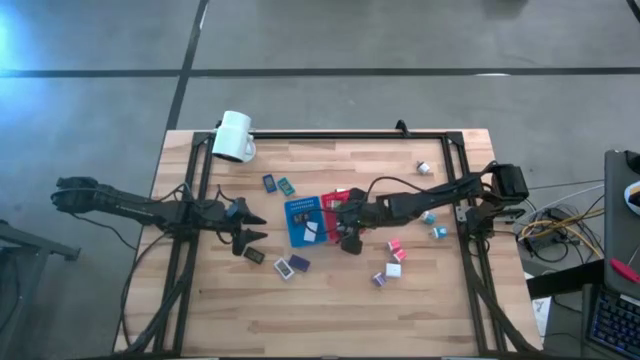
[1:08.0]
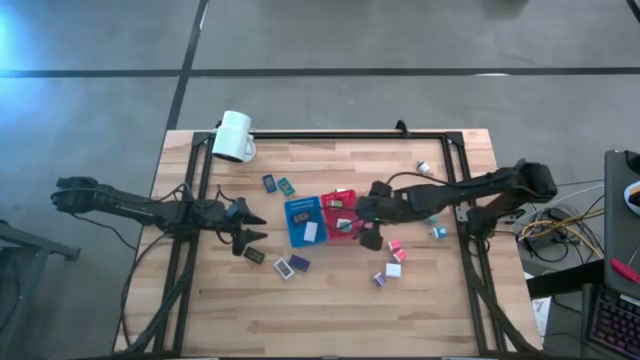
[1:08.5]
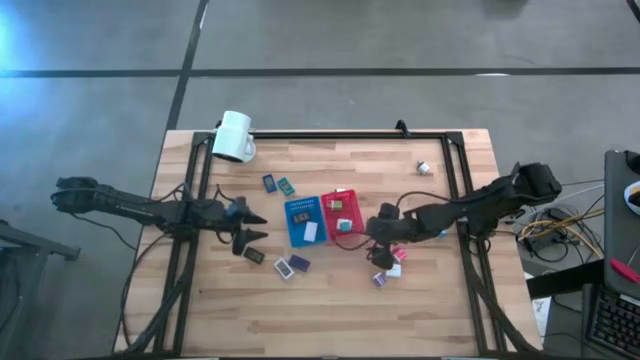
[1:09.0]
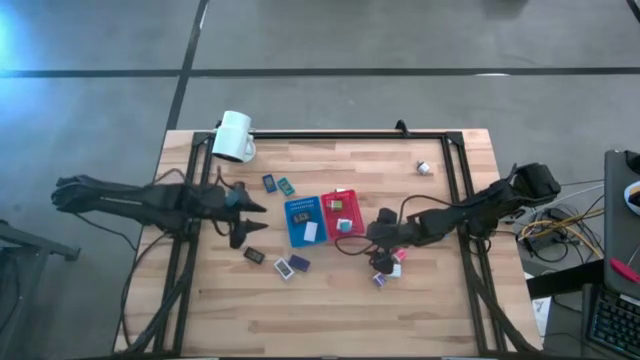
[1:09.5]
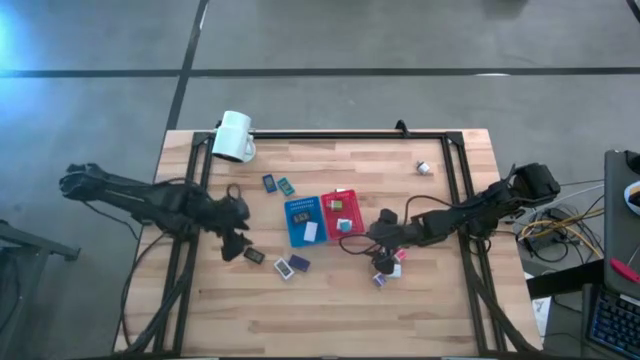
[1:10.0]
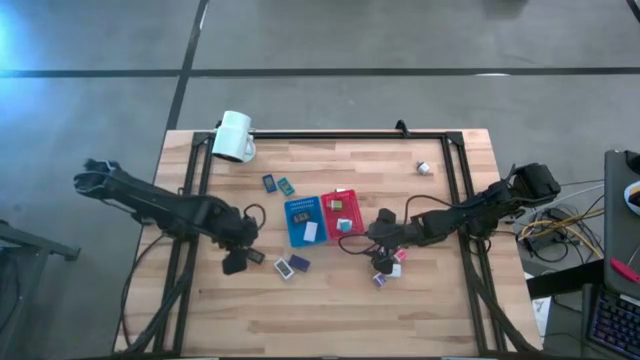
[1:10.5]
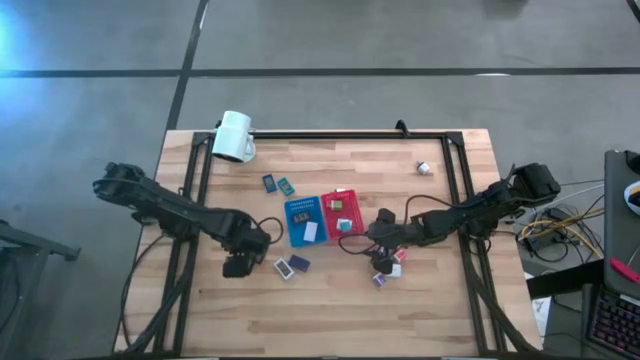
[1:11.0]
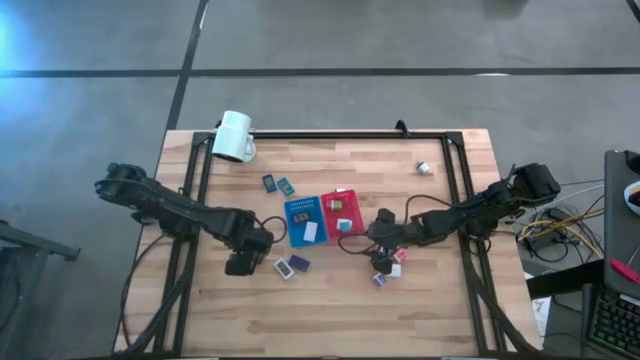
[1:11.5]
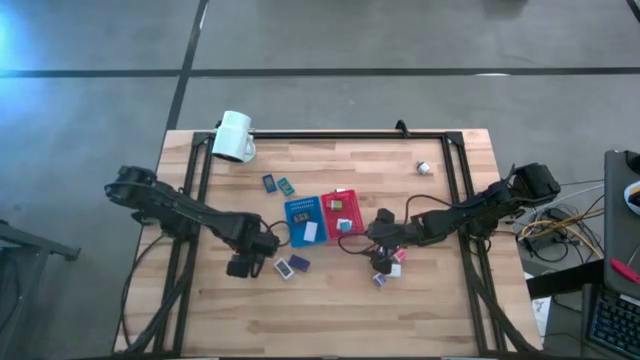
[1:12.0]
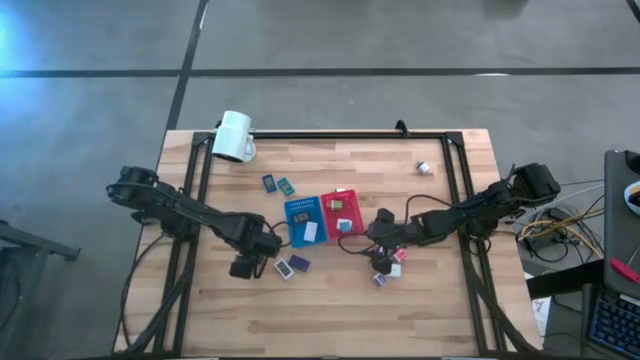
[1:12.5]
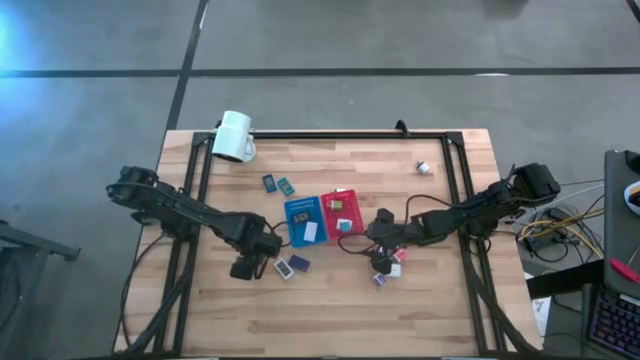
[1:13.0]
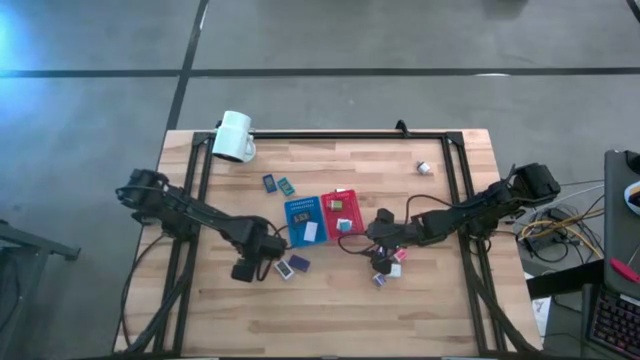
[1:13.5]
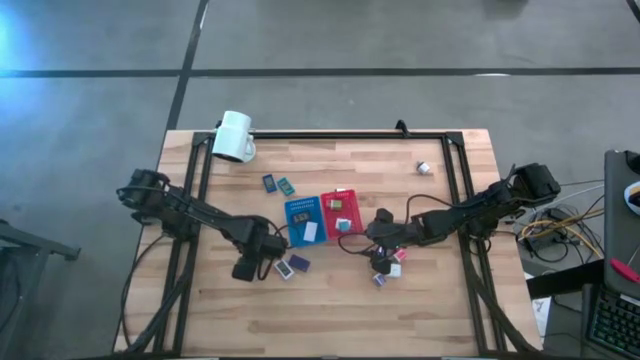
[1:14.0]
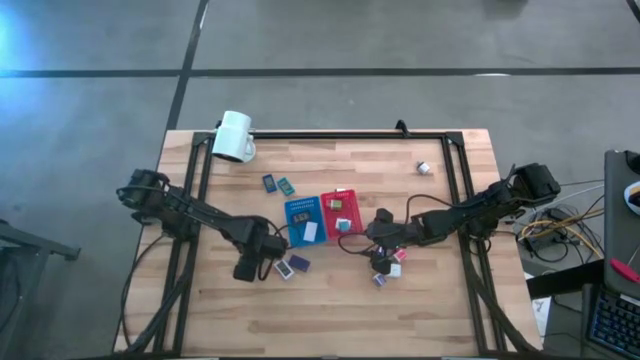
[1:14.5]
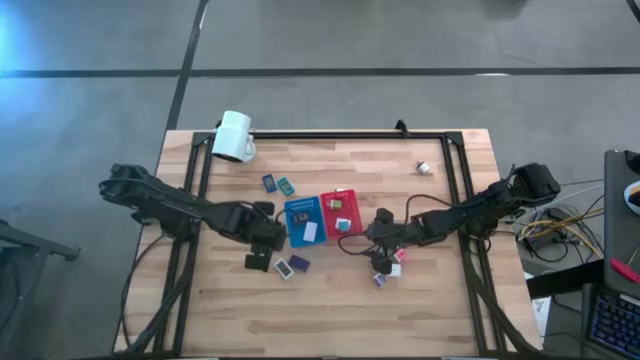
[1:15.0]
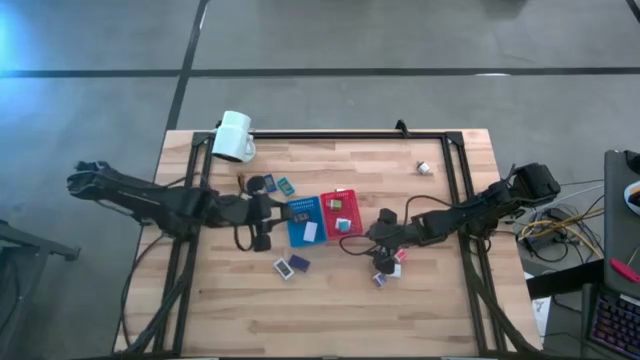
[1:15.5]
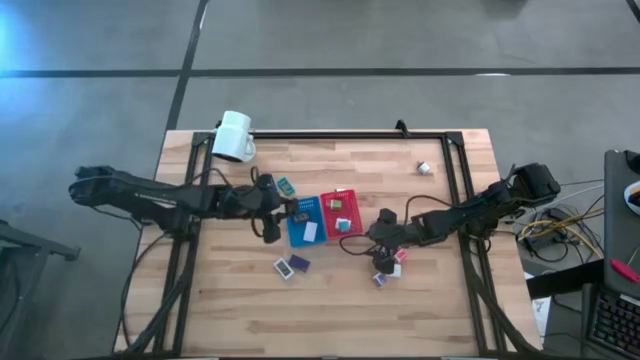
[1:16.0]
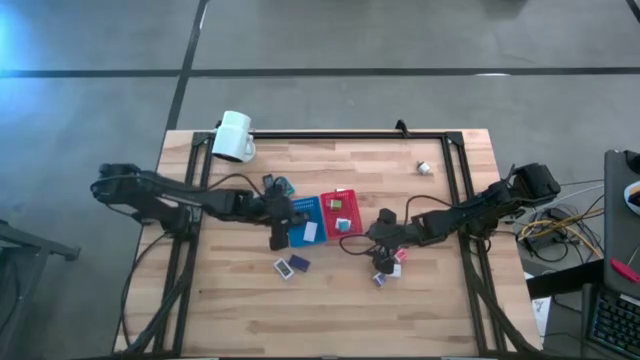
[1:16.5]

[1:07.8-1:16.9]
Task: Pick & Place Office items
Put the black digital clock into the blue bin

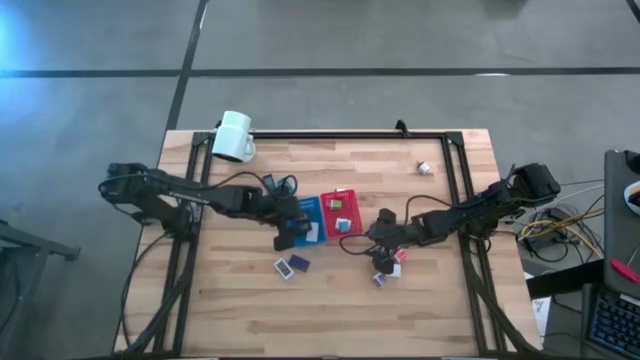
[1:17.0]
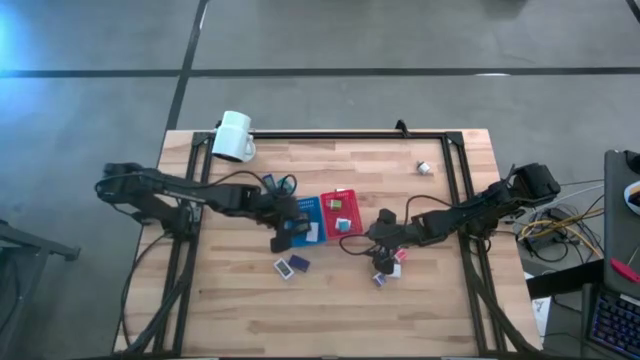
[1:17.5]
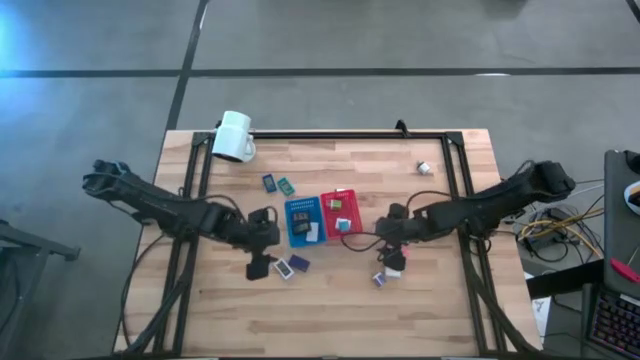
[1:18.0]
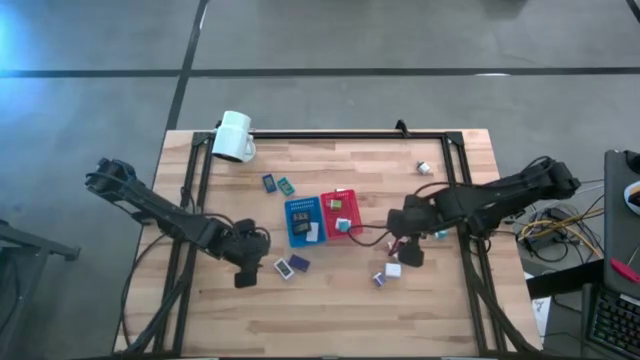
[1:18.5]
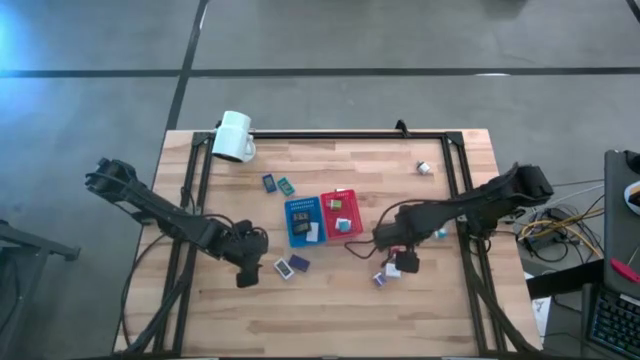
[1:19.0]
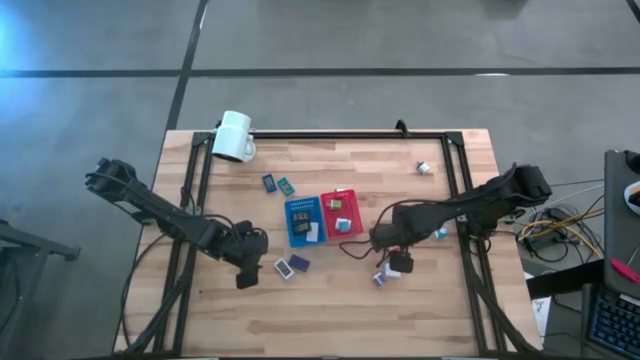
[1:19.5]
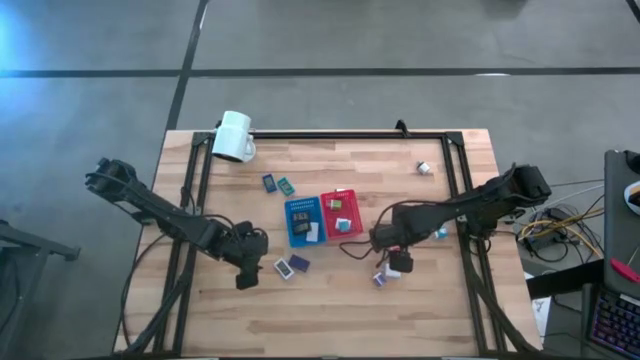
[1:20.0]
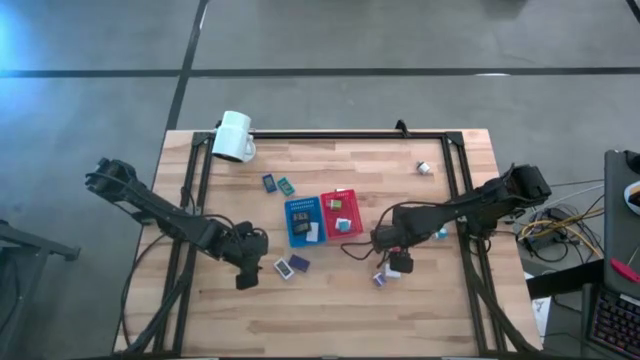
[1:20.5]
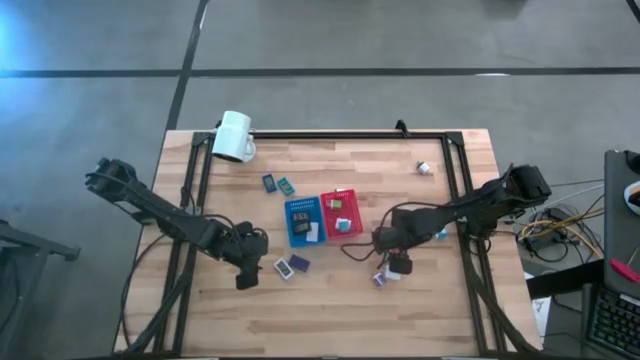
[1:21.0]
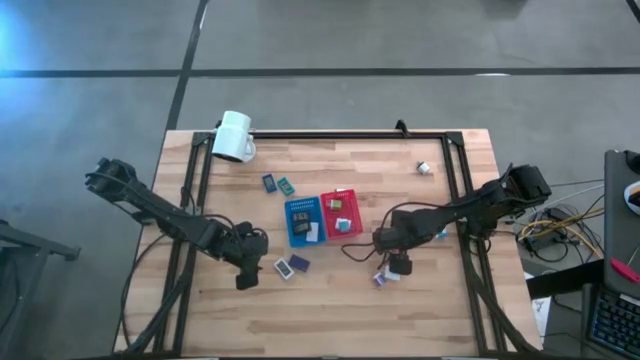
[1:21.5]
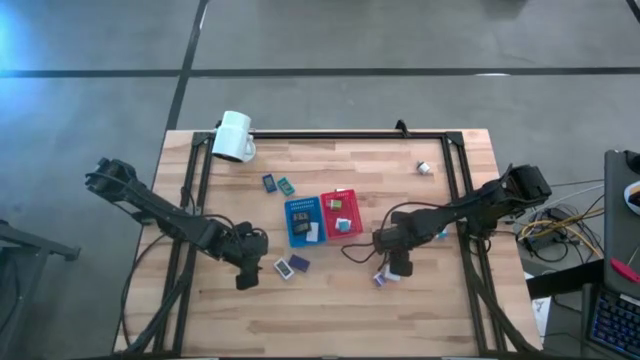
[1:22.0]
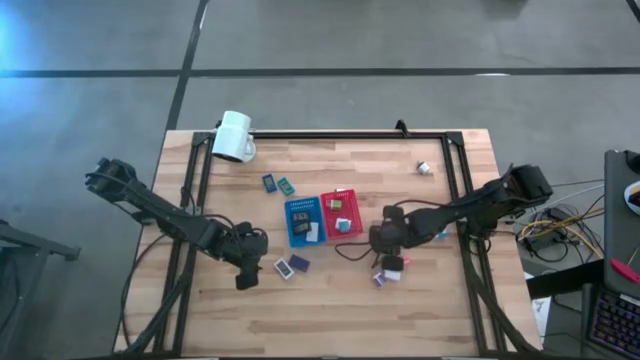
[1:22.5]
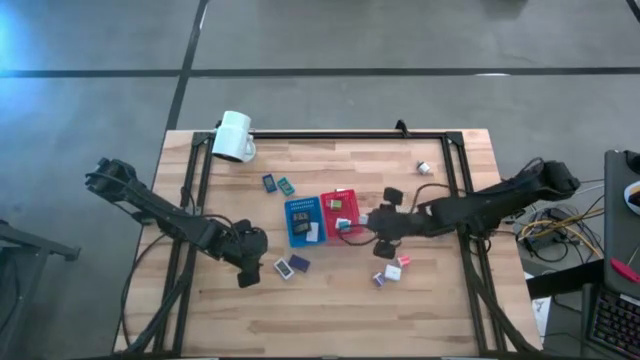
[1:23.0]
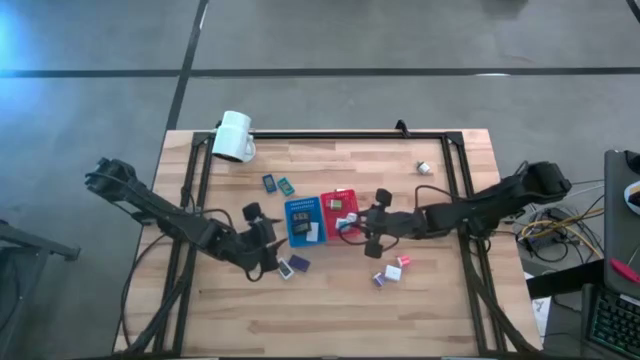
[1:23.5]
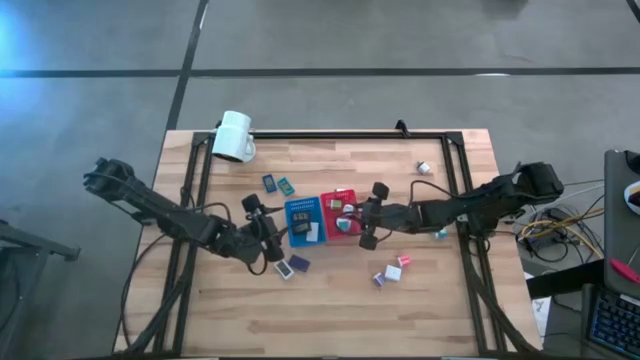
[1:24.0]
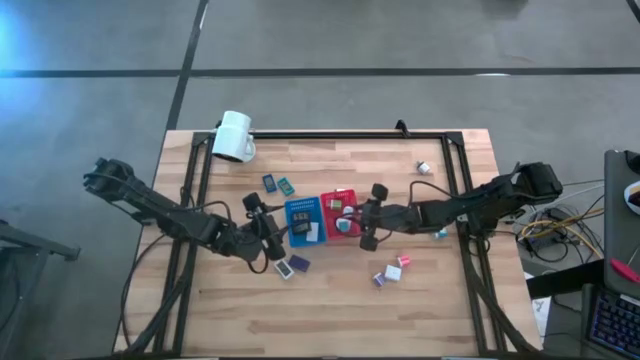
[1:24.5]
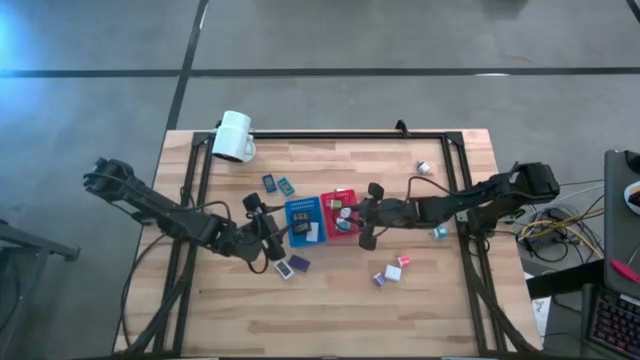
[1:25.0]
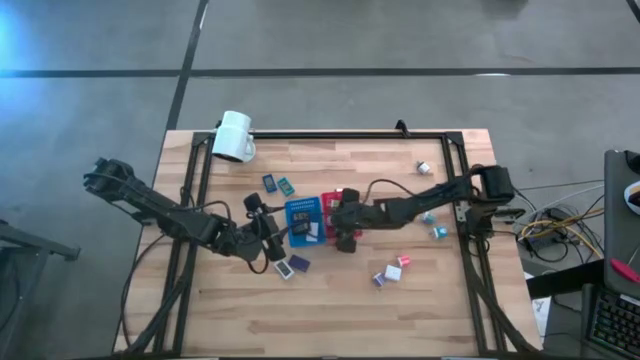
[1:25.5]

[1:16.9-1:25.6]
Put the top pink charger adapter into the red bin

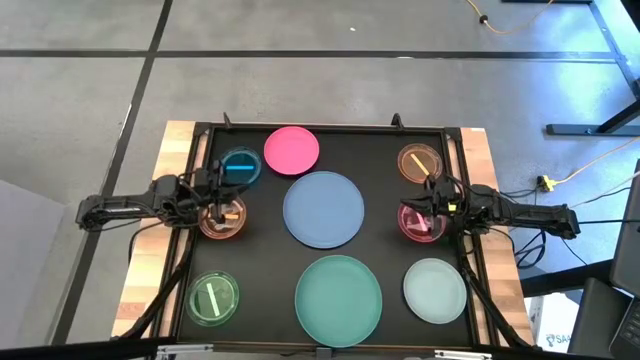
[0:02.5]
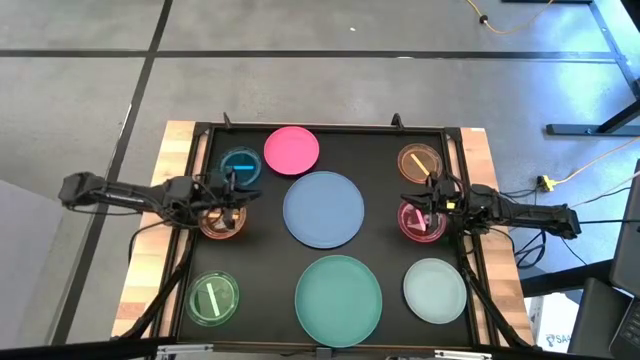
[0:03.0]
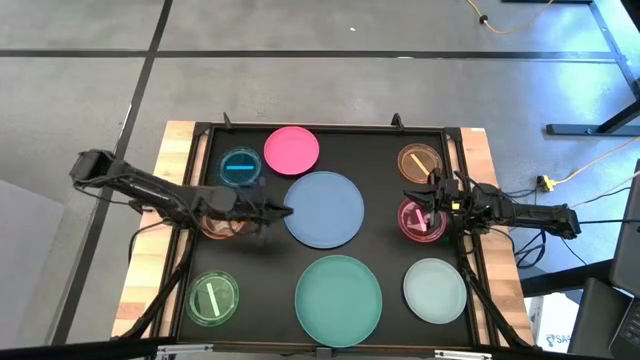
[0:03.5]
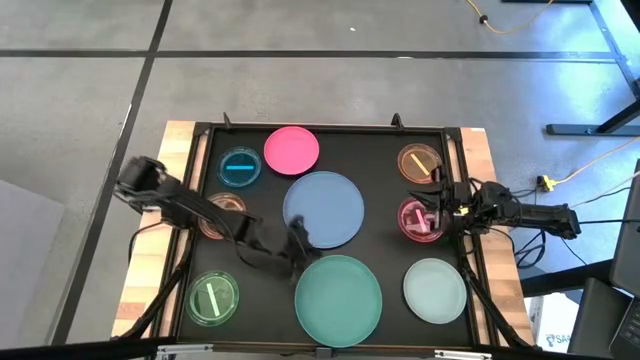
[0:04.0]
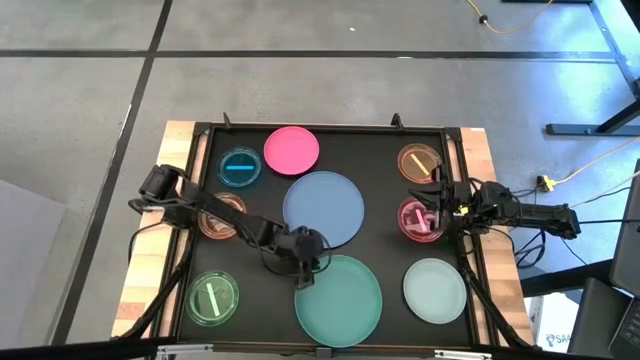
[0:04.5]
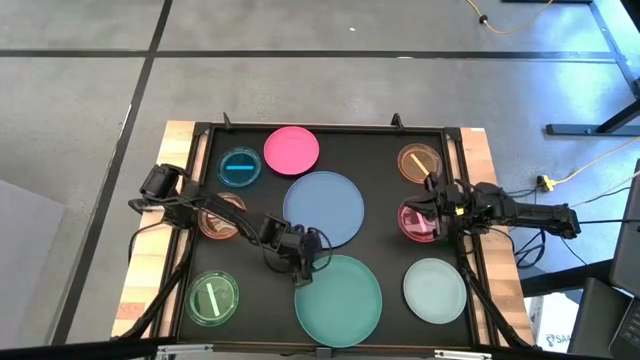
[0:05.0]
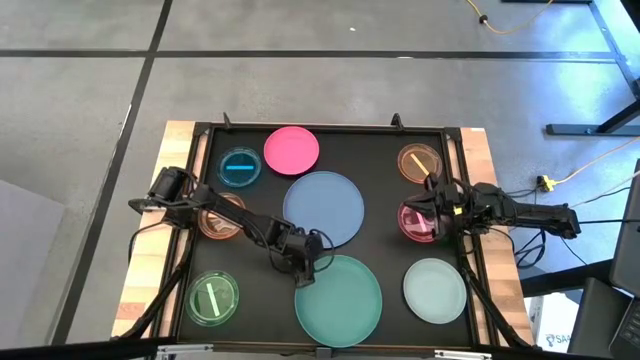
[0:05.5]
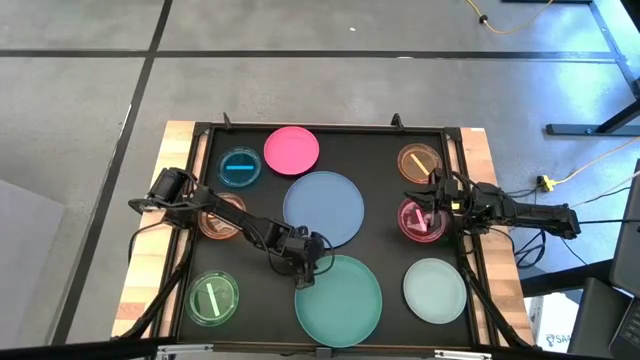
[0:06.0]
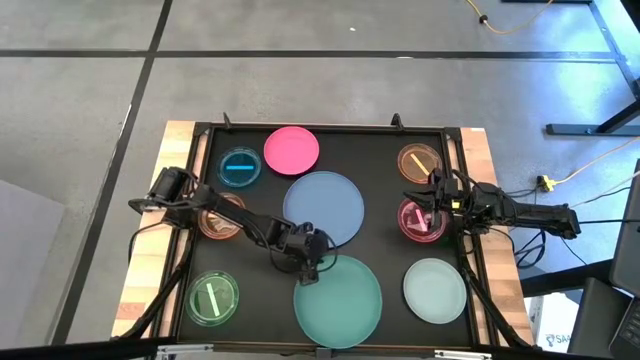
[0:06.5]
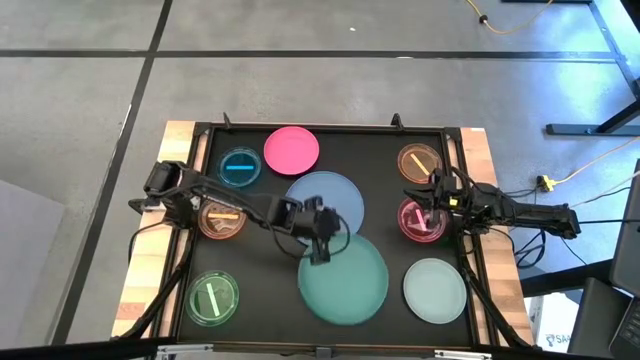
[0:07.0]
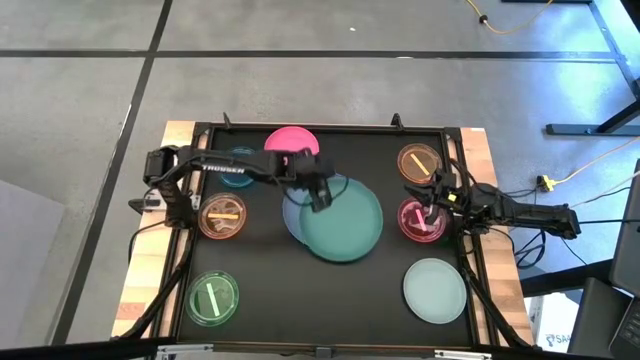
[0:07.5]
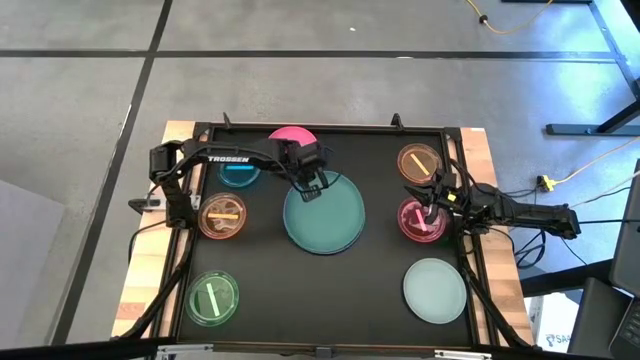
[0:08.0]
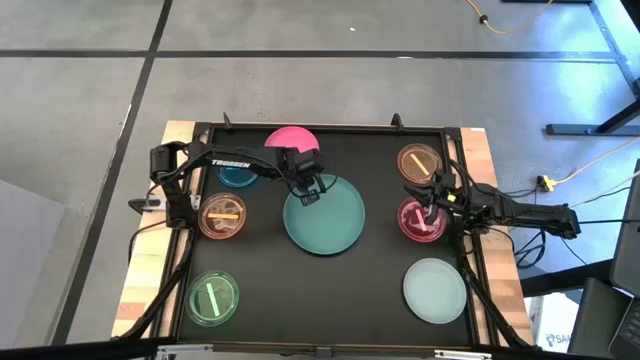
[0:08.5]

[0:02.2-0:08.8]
Task: Stack plastic plates
Stack the green plate on top of the blue plate
